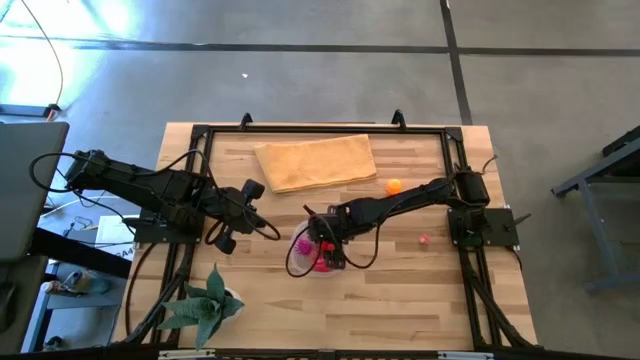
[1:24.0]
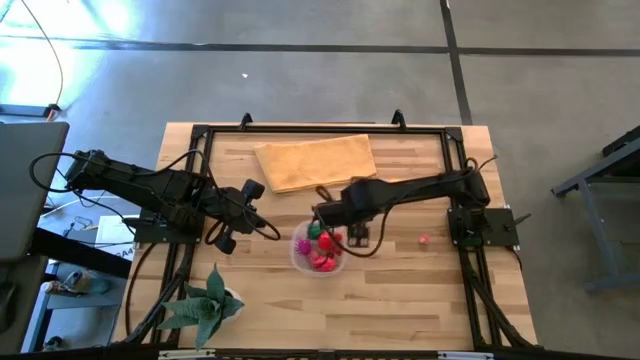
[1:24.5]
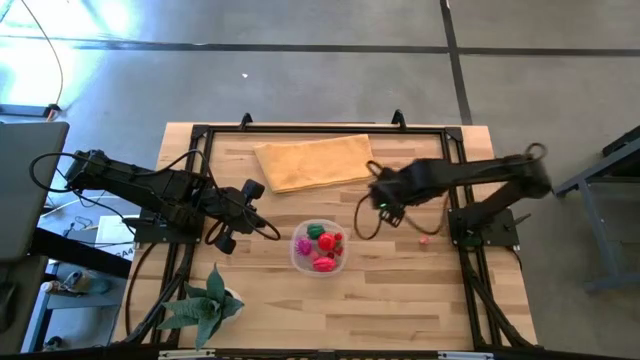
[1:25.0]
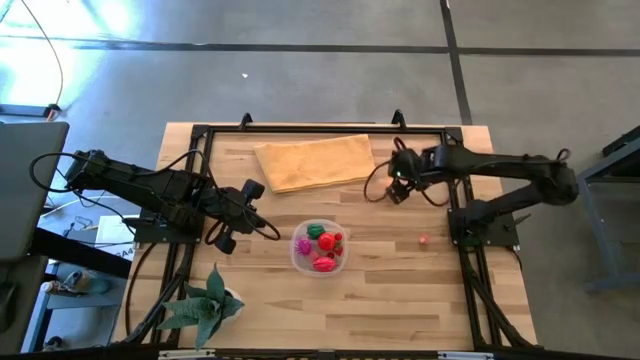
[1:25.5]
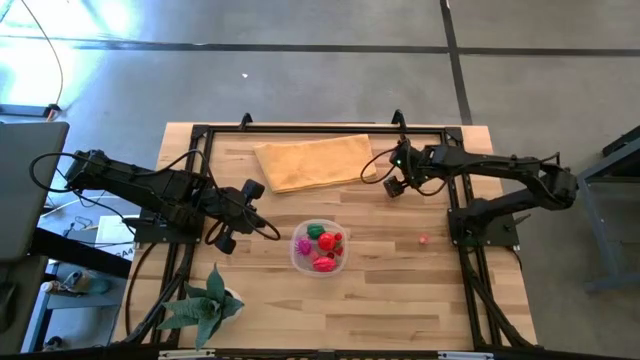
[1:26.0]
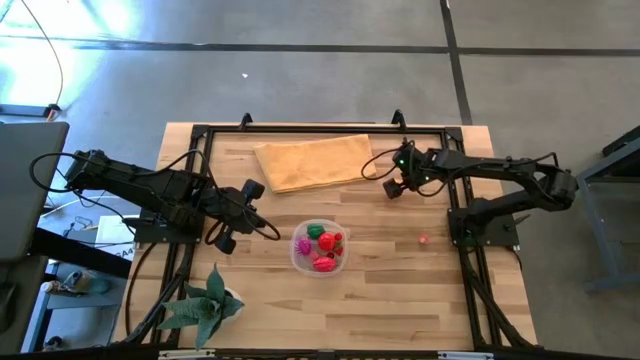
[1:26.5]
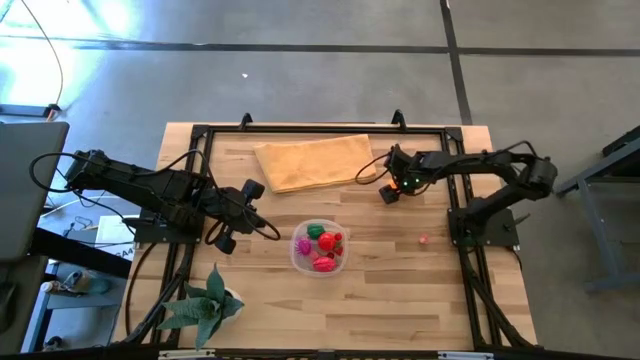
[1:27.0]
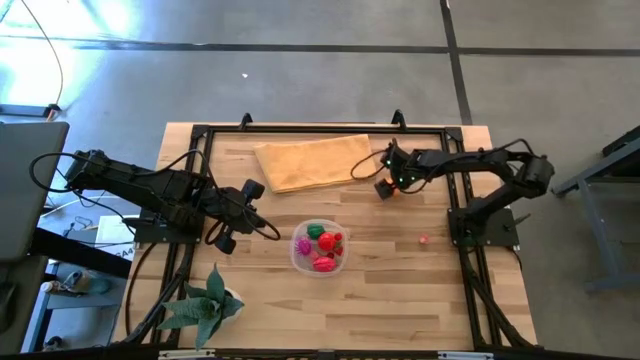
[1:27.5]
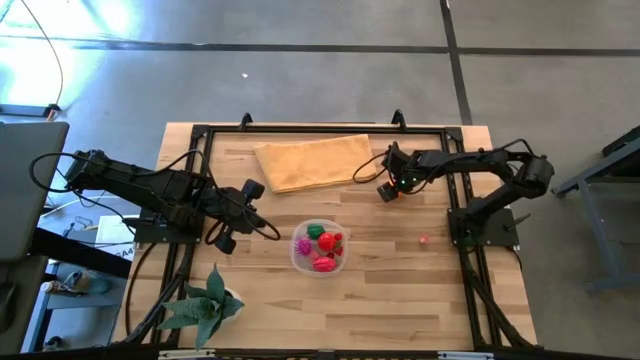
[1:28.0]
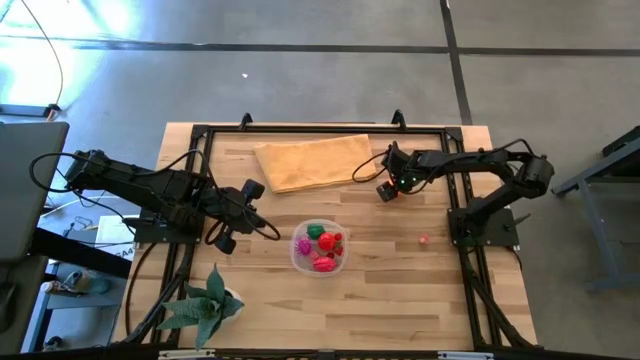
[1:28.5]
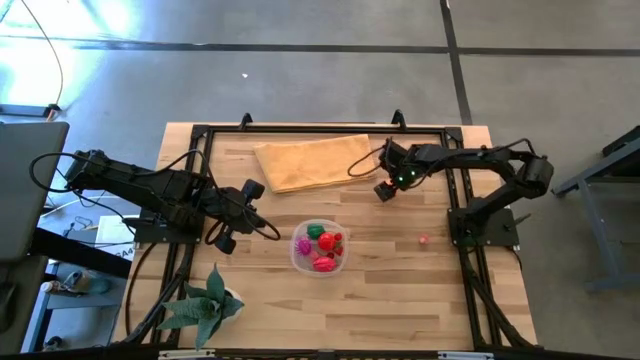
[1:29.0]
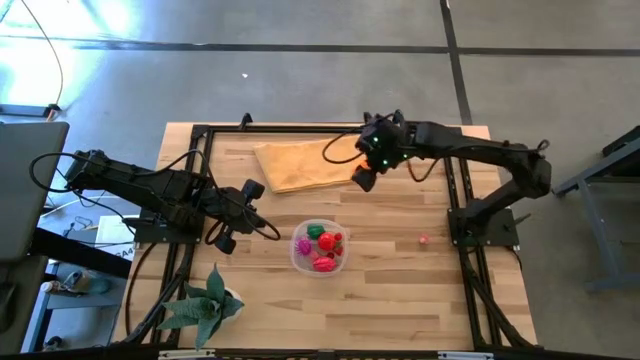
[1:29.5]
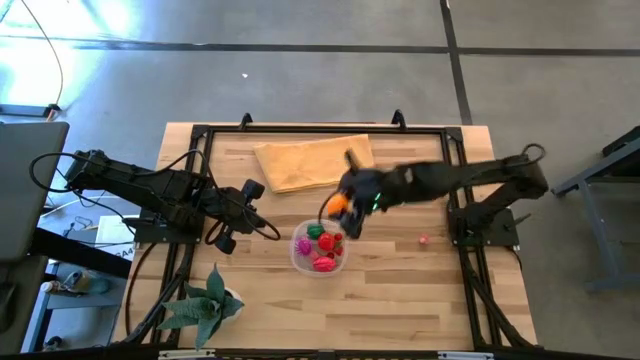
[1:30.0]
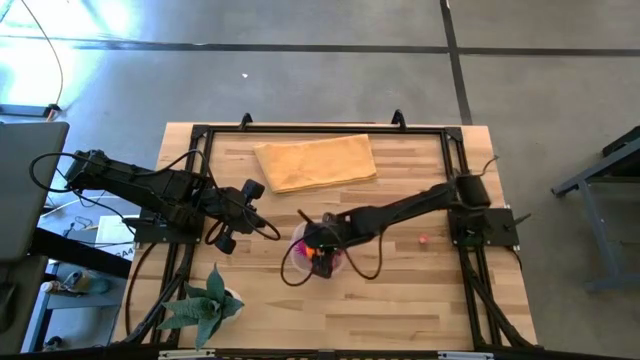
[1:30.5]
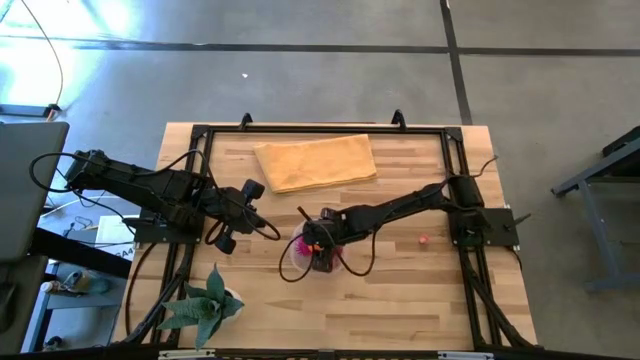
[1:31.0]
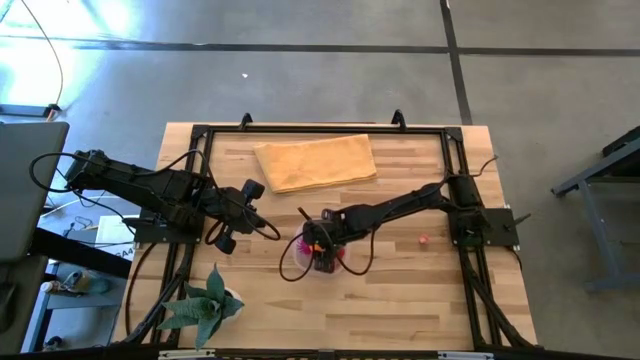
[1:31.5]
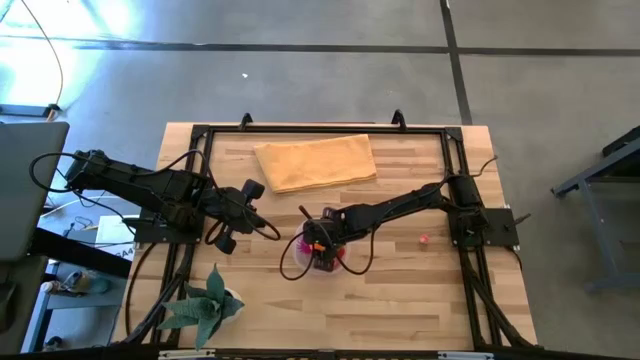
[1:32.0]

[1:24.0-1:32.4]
Task: Pick and placing Produce into tupperware
Put the orange into the transparent bin

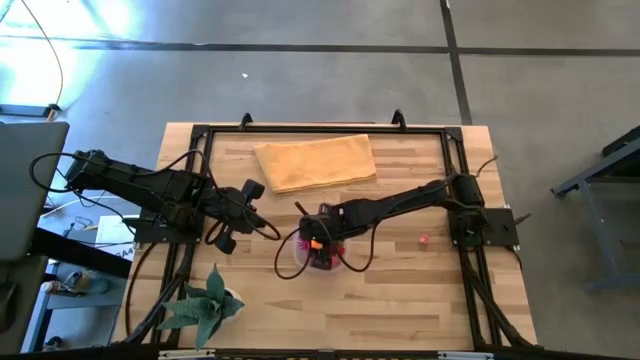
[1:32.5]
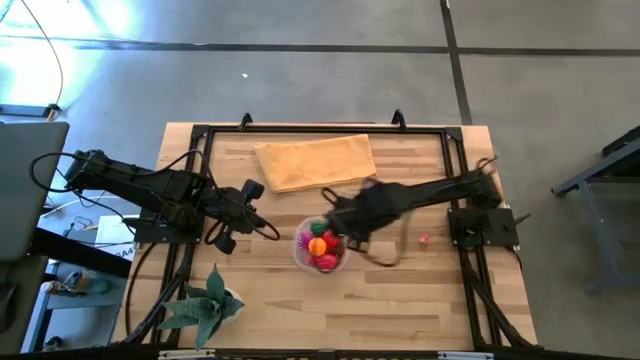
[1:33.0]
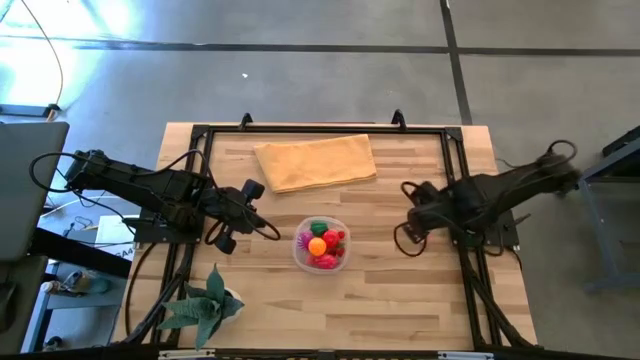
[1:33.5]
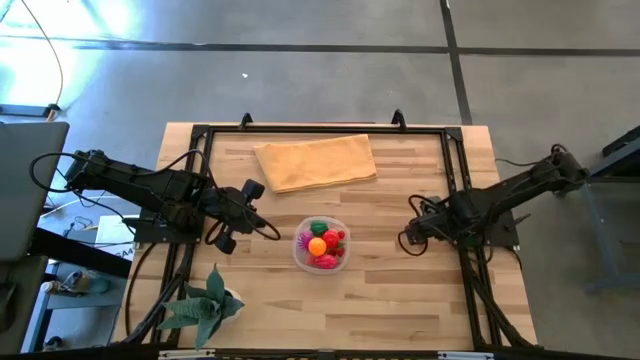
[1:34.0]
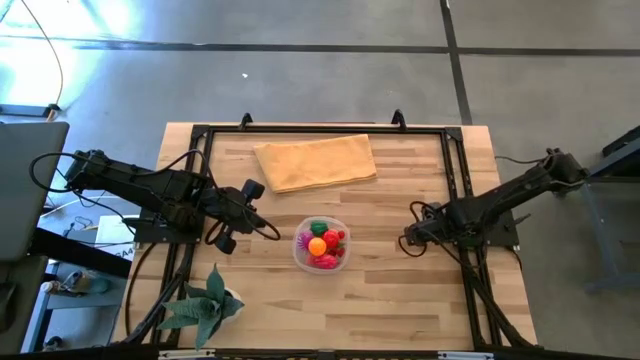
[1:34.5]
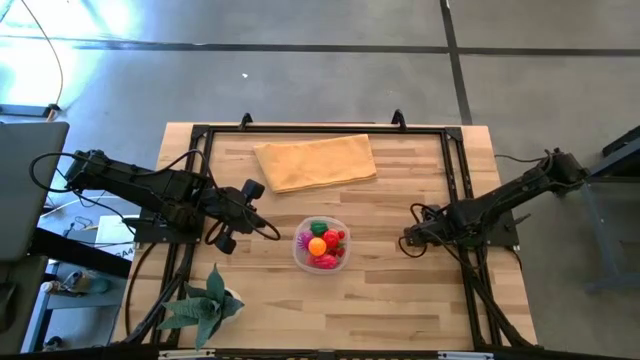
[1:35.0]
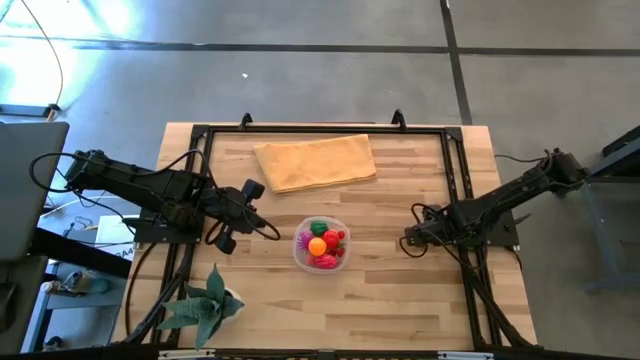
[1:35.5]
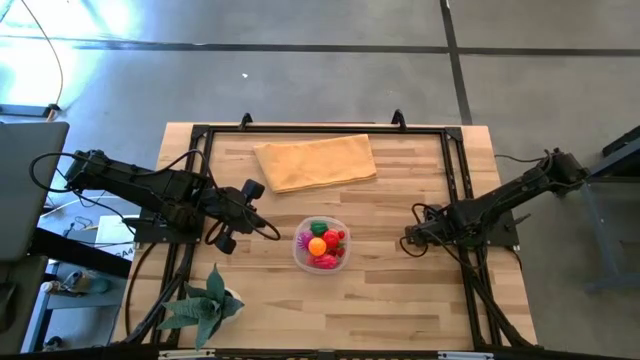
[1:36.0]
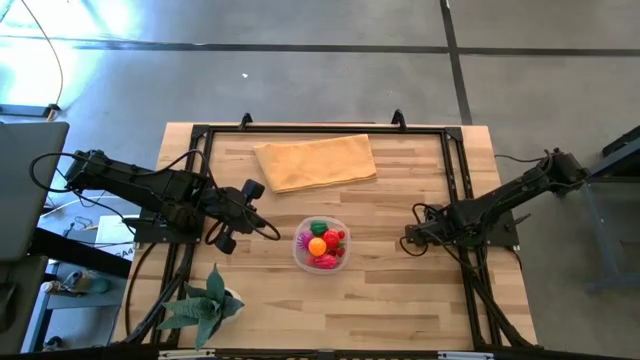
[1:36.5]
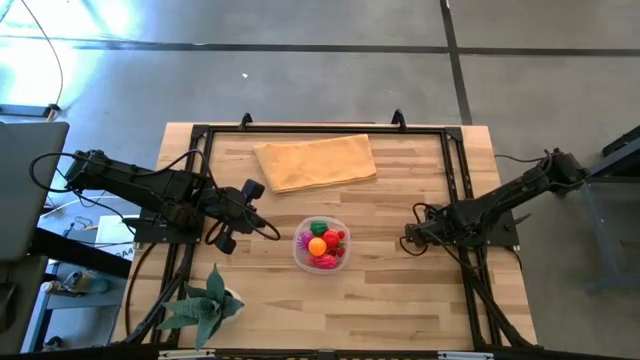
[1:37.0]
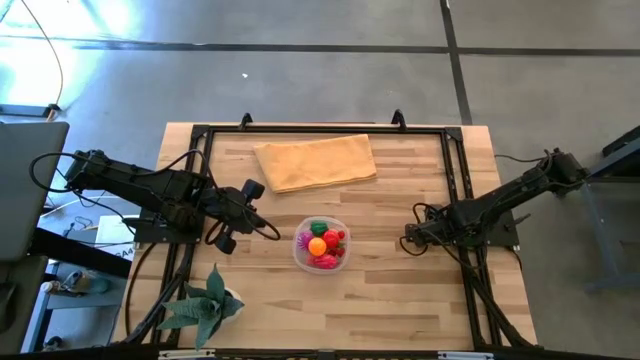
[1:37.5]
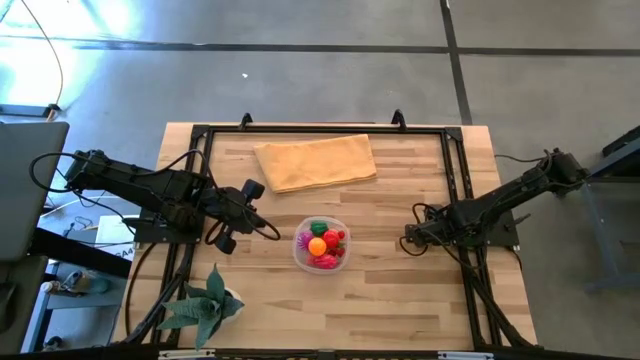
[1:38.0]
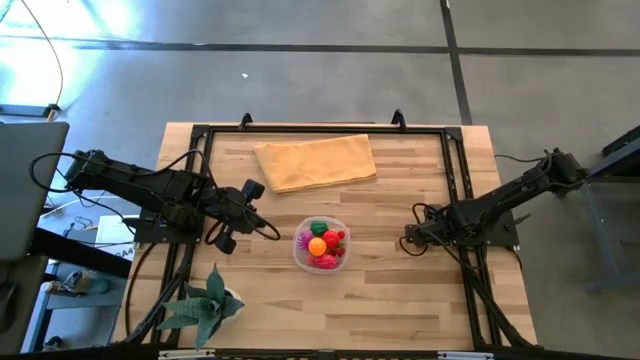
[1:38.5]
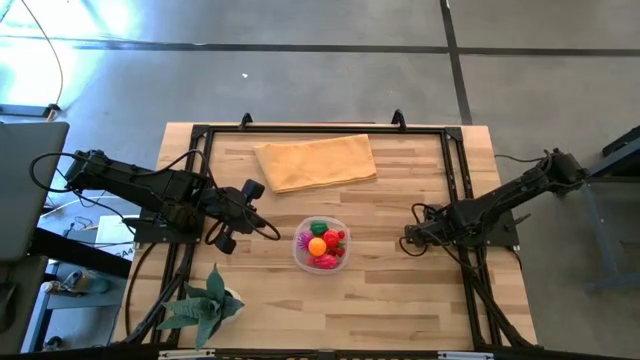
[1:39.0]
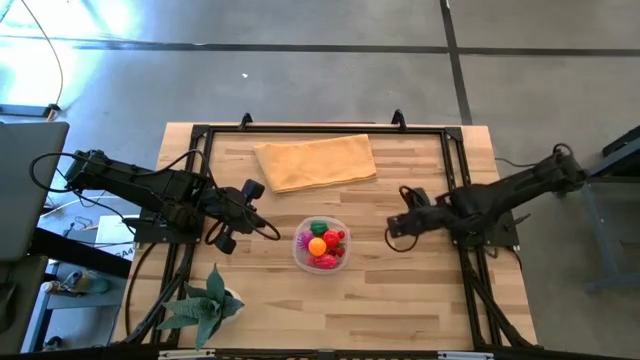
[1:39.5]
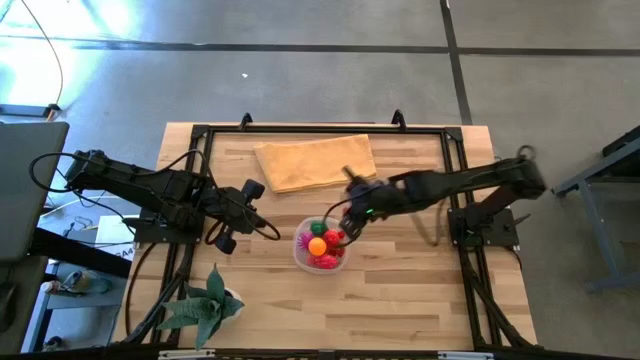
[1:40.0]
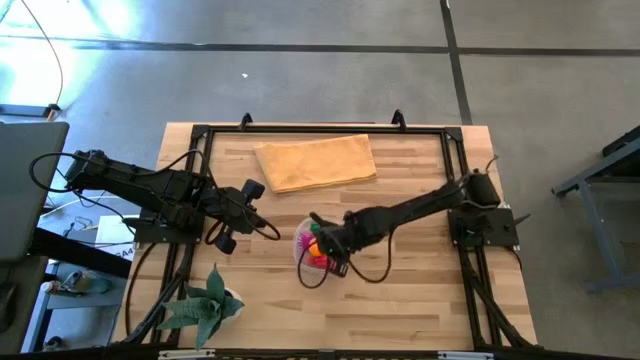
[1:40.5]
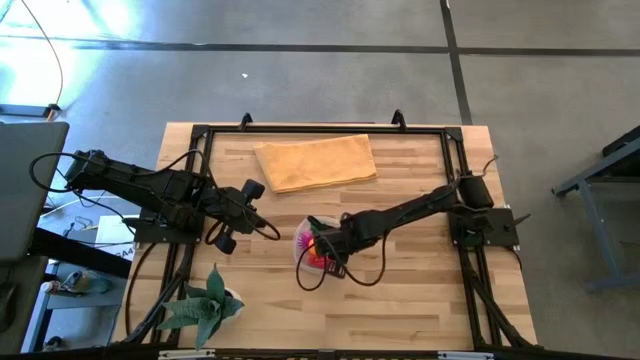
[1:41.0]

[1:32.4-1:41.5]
Put the pink peach into the transparent bin

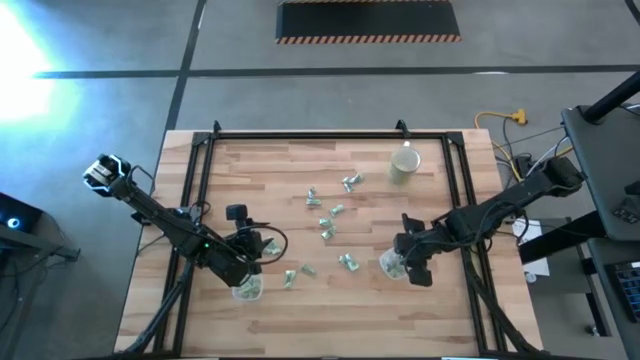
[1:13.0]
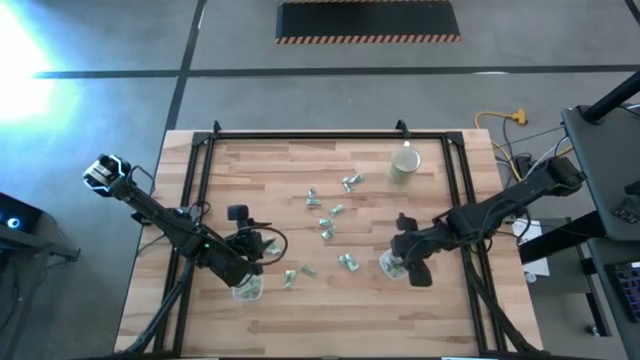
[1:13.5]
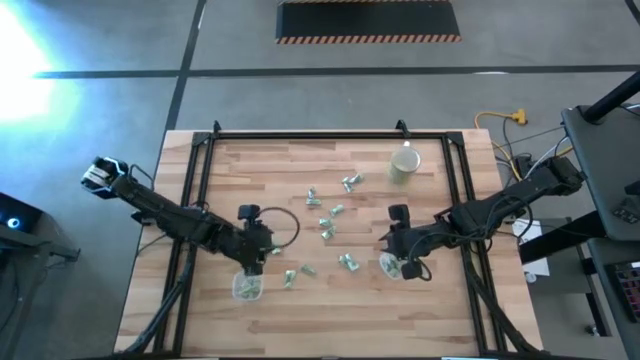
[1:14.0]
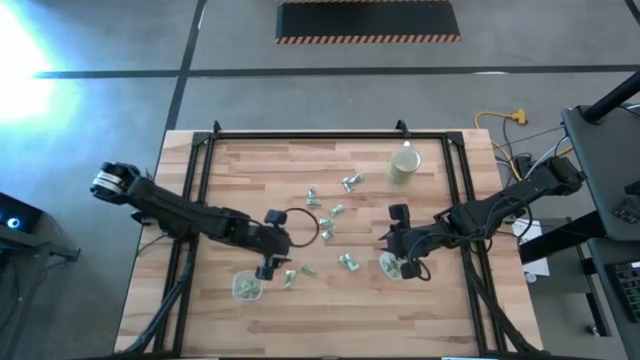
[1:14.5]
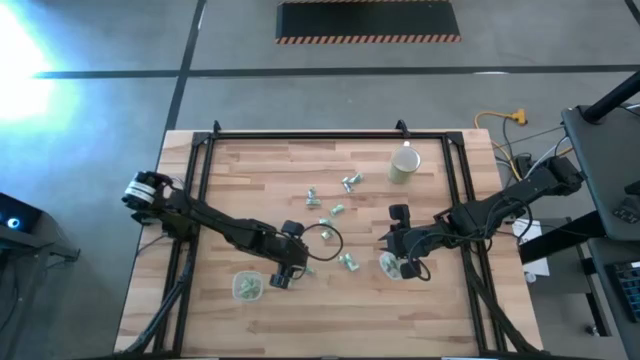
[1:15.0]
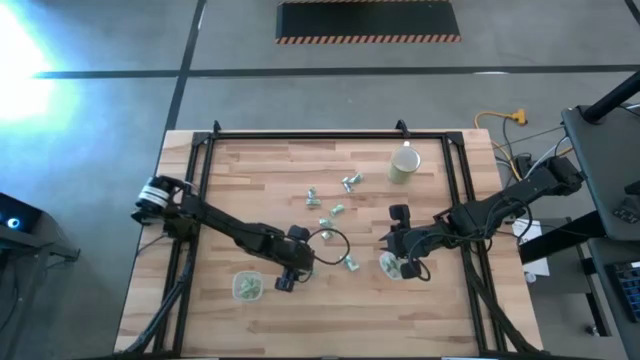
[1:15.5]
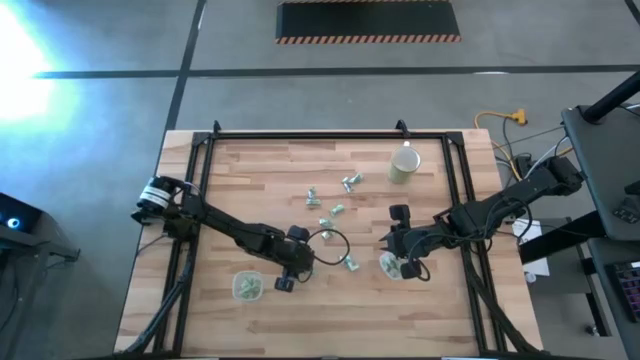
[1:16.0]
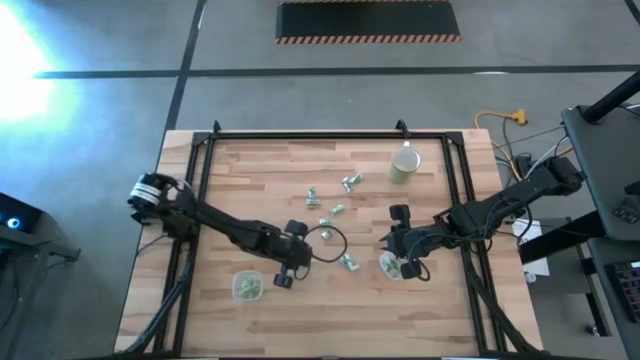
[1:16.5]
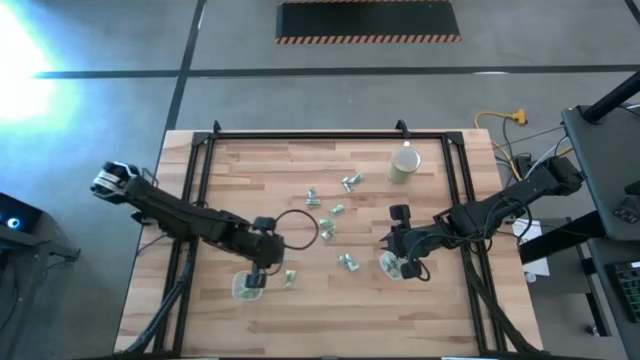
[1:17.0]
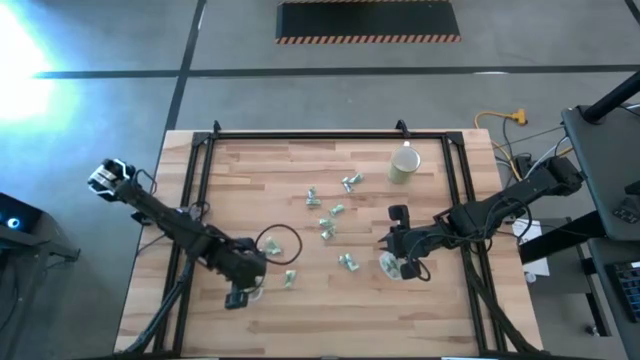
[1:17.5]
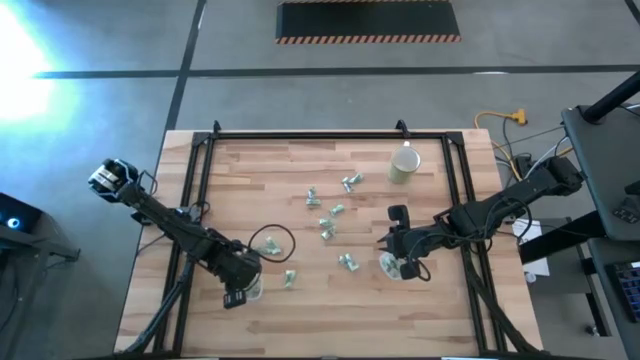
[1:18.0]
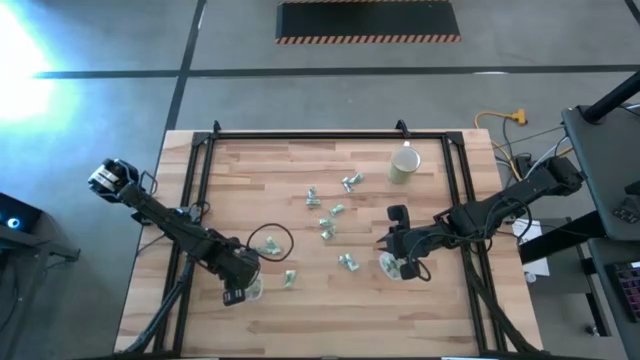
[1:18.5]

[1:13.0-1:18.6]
Task: Pick and place Stevia / Truvia into bins
Put the stevia packet into the left transparent container
